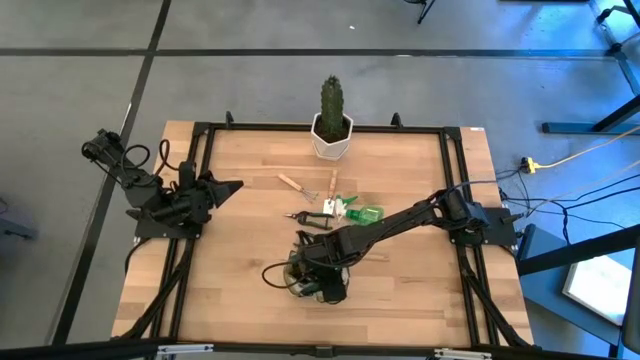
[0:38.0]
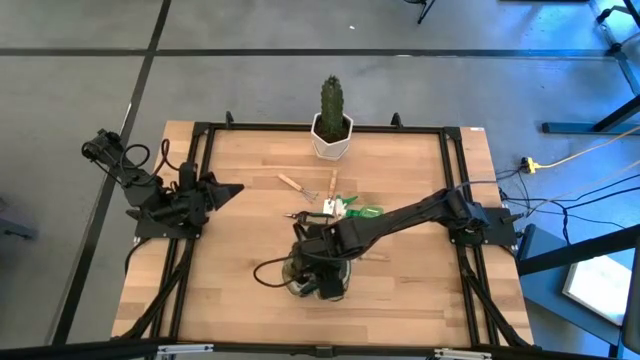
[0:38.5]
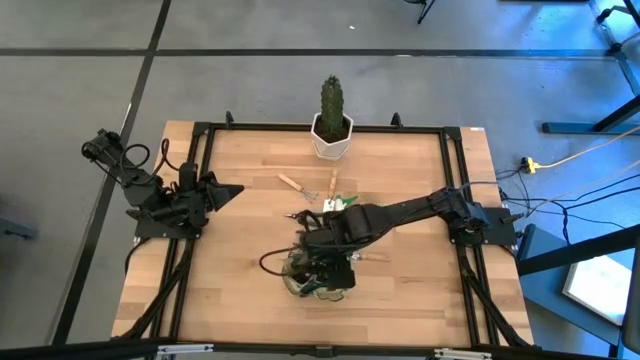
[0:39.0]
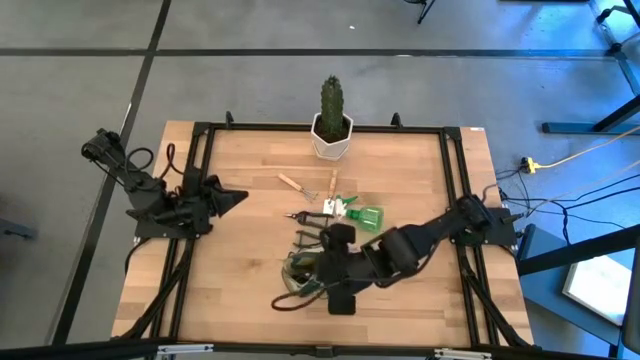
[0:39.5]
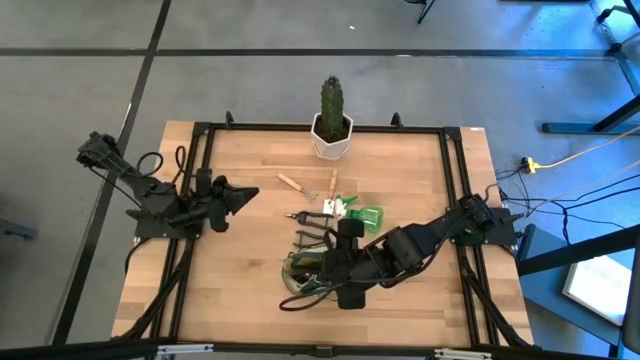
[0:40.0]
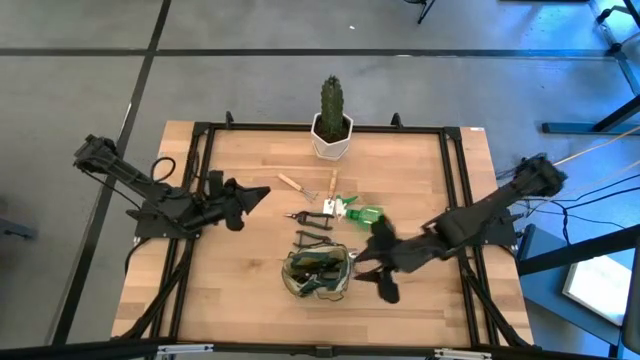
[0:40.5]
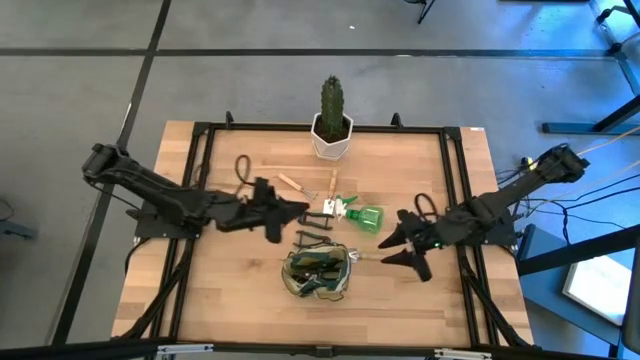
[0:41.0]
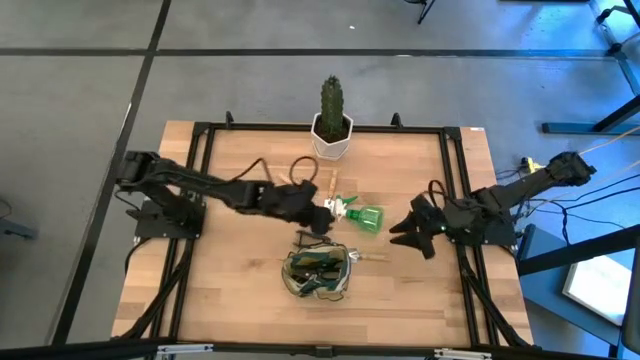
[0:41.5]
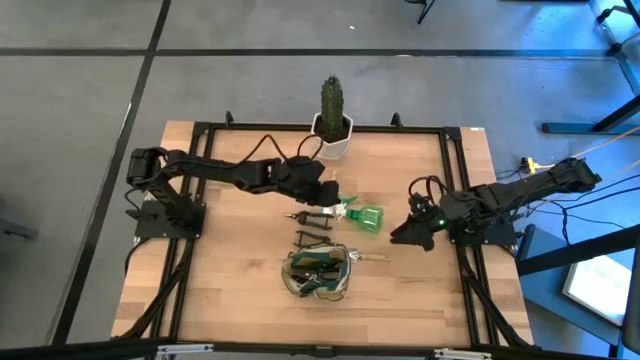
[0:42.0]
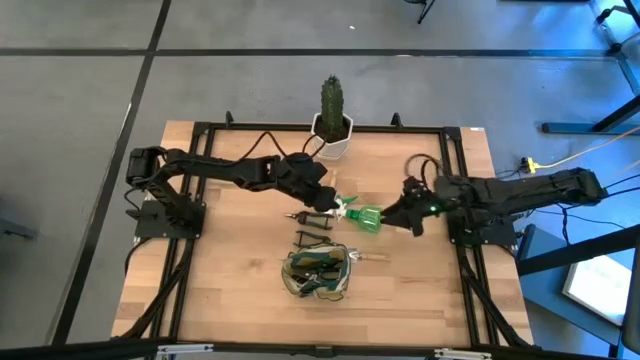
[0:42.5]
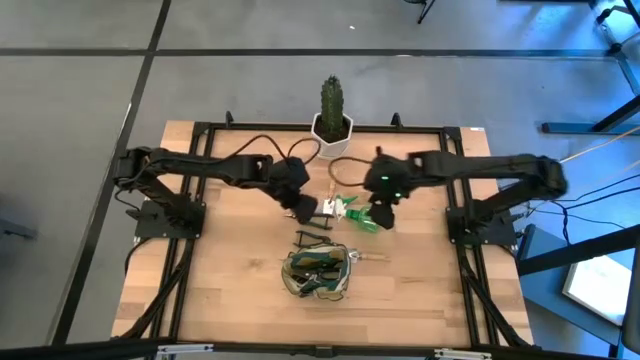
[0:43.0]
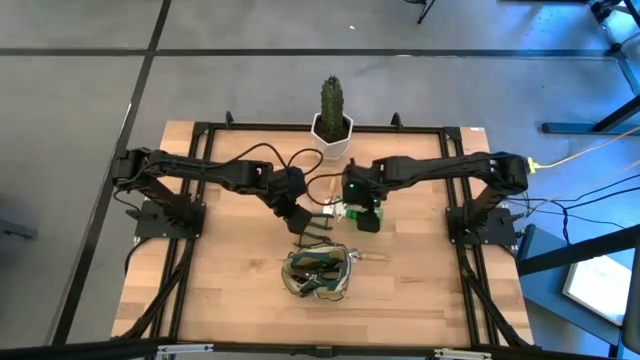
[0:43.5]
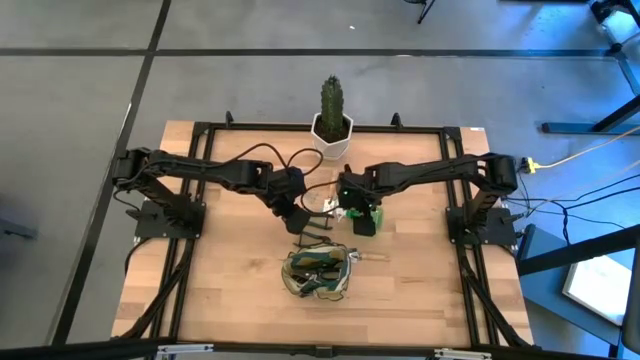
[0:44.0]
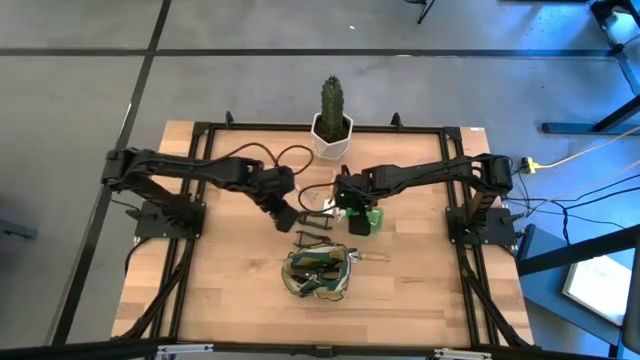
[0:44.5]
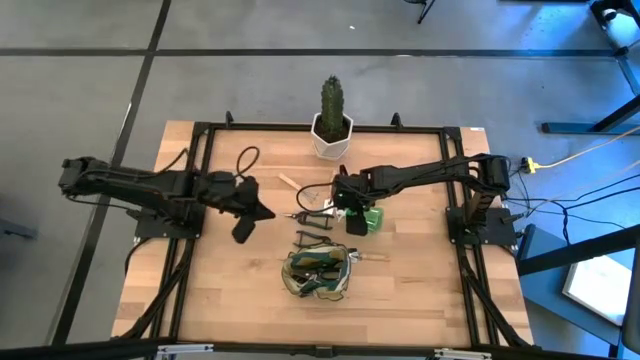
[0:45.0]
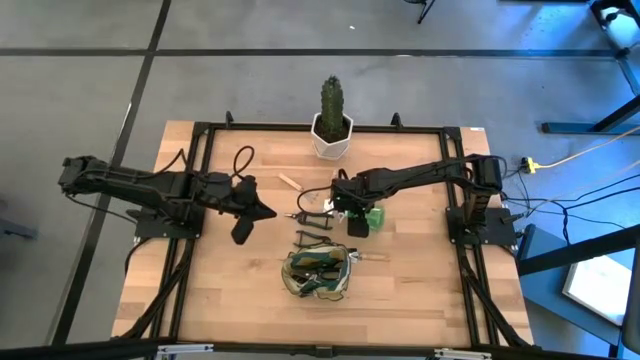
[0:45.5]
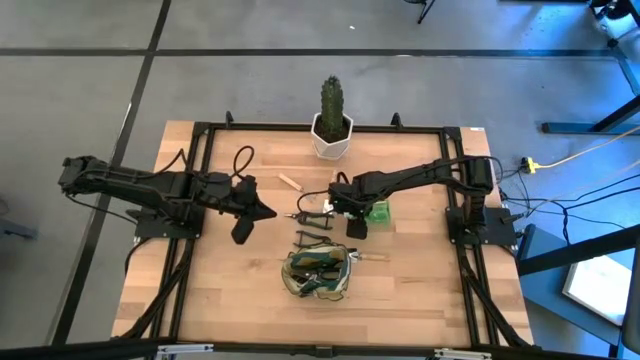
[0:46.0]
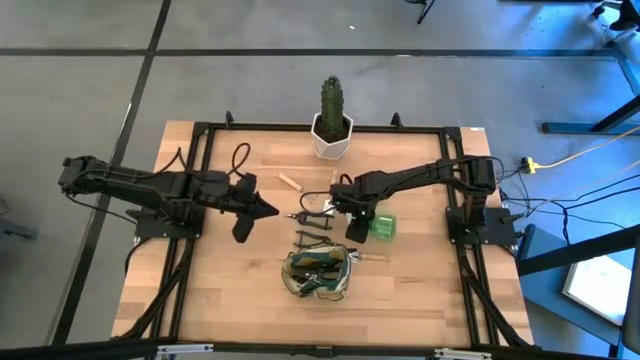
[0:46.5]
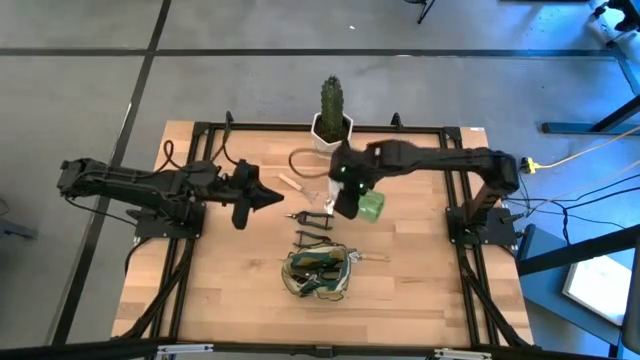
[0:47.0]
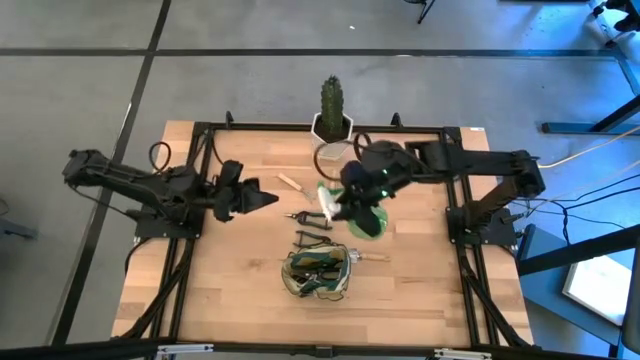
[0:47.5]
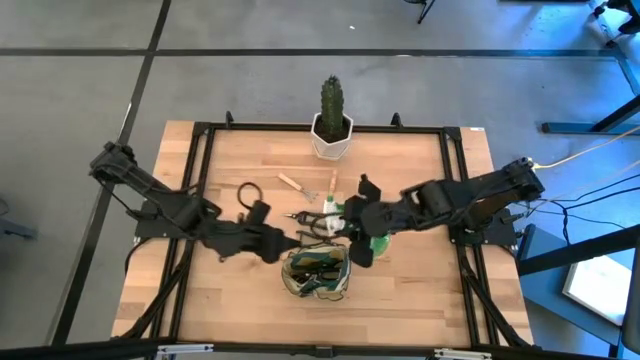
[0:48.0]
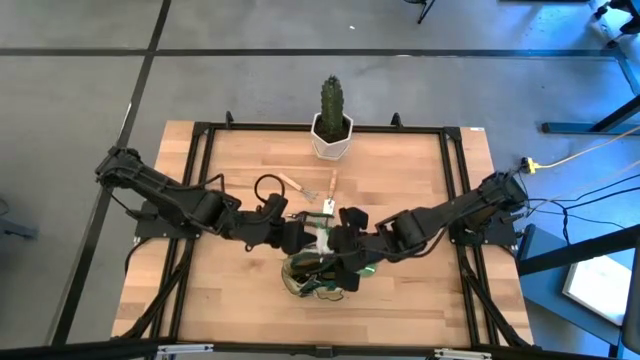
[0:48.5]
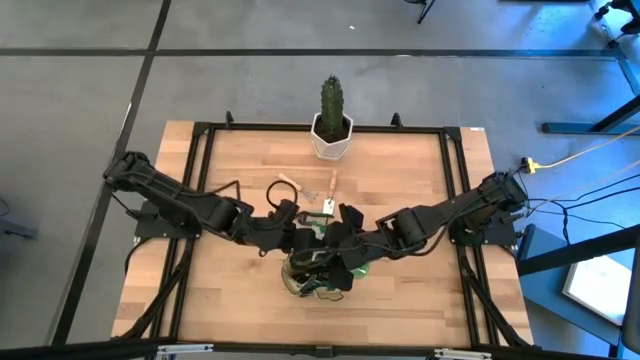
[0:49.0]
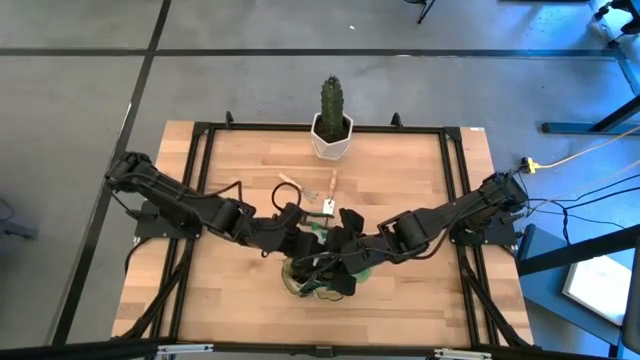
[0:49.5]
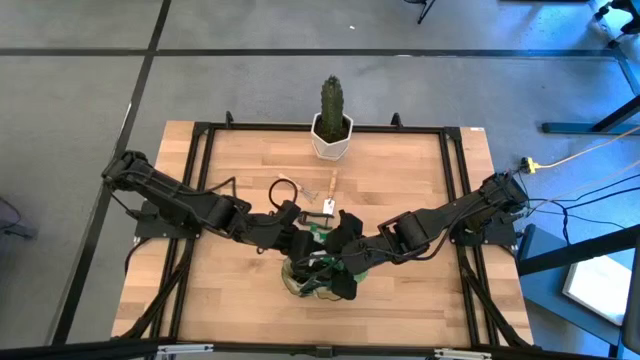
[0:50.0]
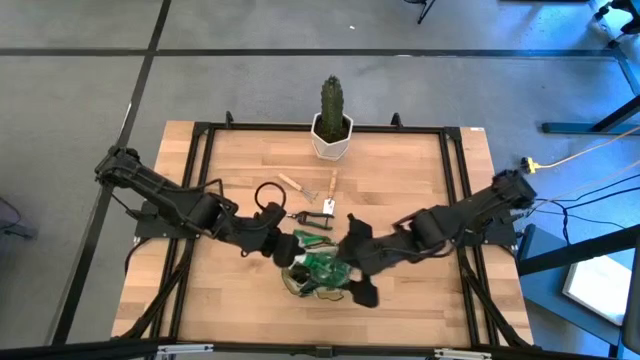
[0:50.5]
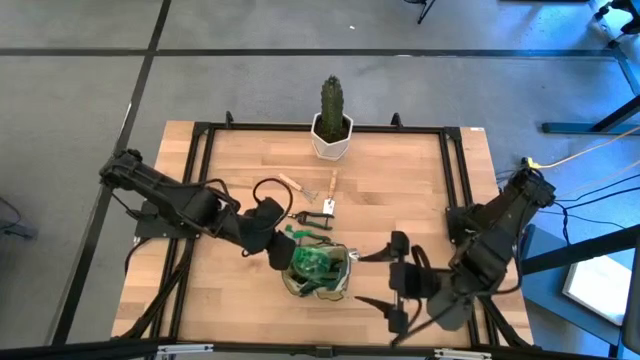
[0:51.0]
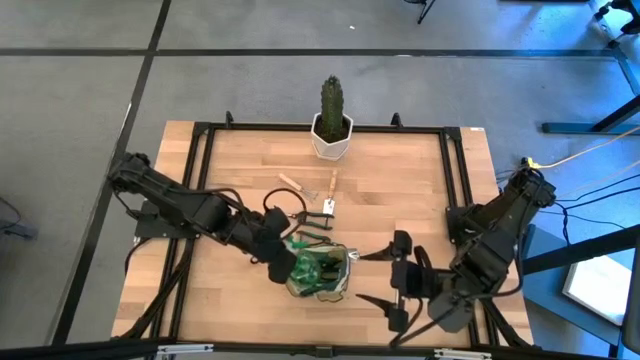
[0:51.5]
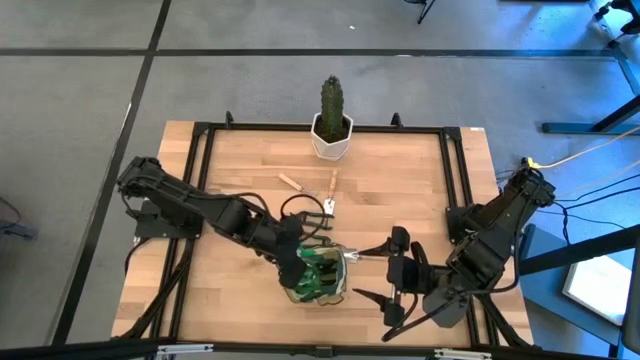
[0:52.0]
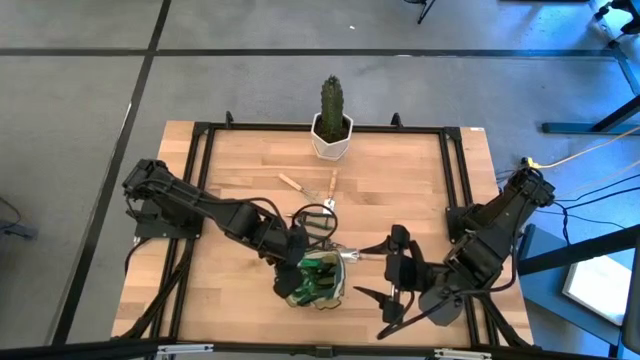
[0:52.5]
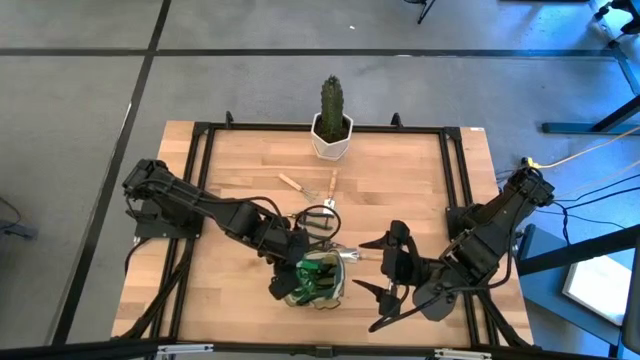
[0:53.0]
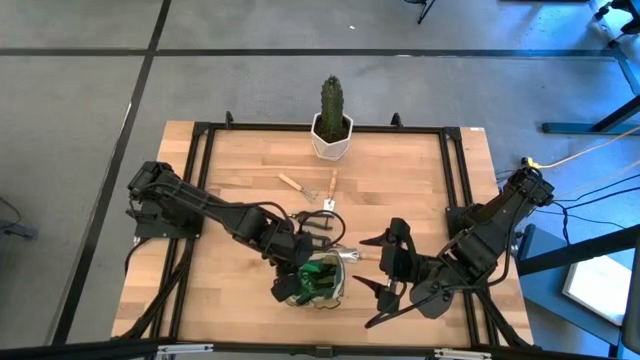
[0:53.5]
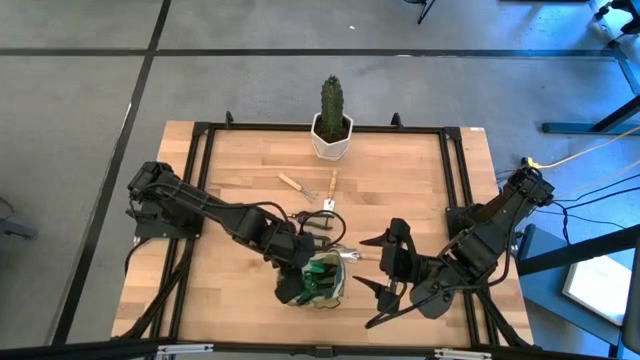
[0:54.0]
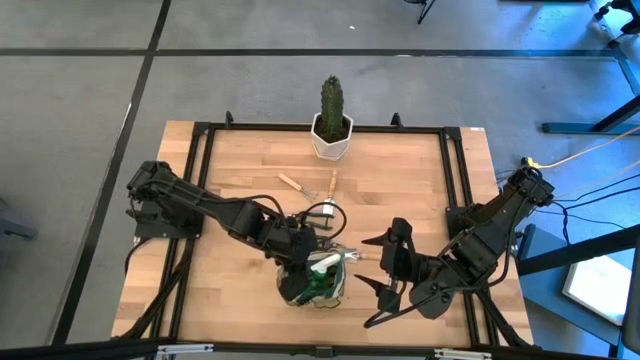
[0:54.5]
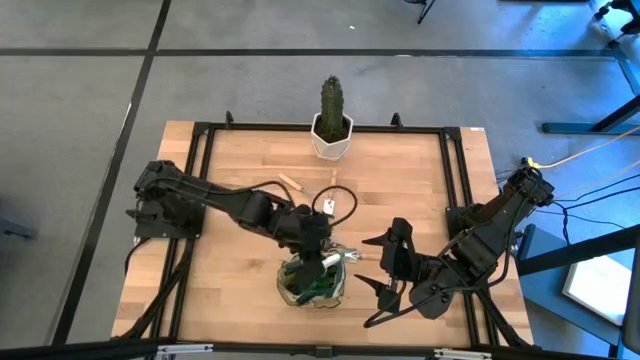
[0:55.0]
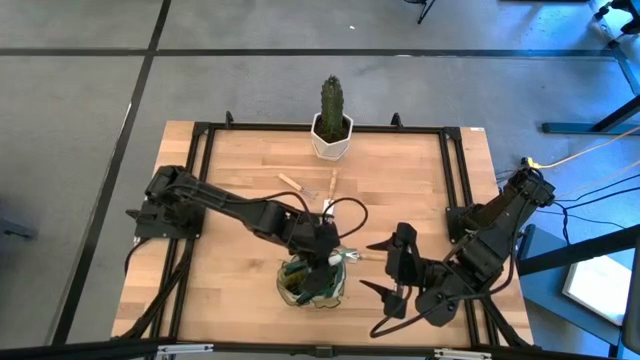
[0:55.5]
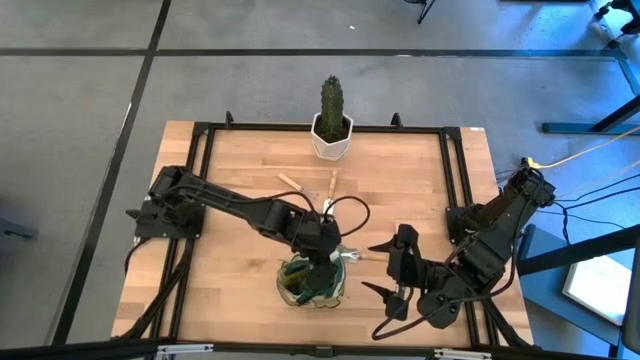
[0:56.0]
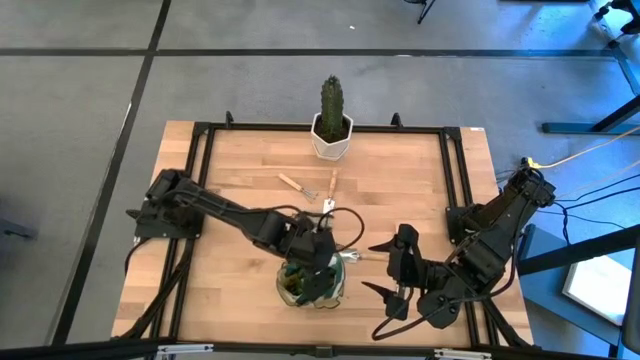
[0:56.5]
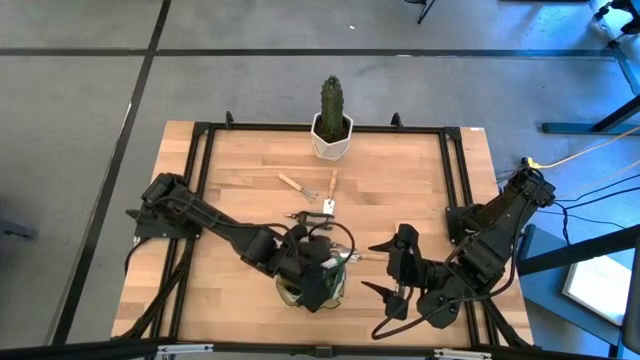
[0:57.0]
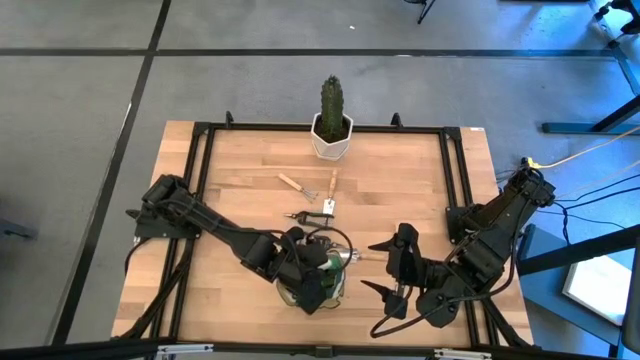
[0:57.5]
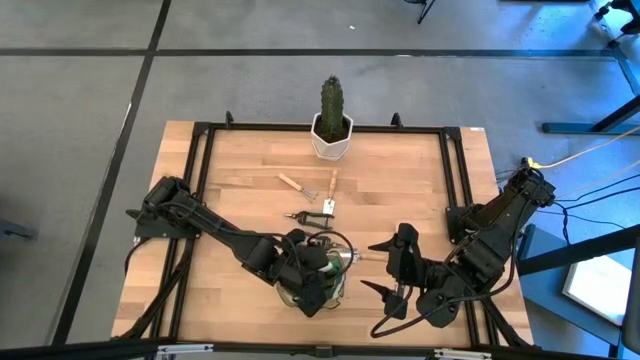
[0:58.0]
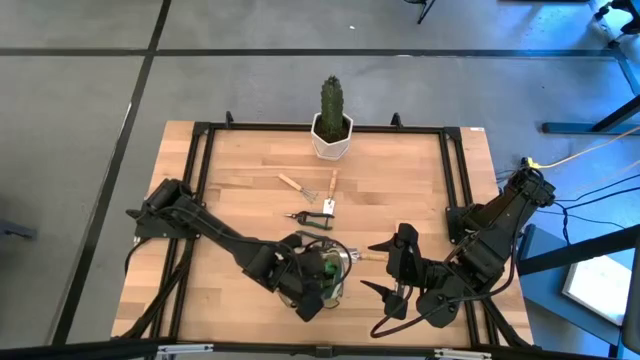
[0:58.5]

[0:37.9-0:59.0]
Task: Pick & Place Garden tools in Gardening bag
Put the spray bottle into the gardening bag
